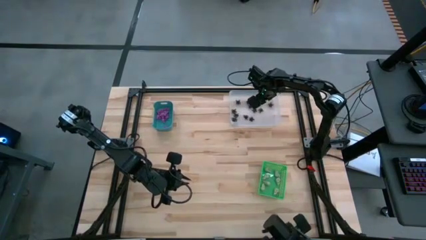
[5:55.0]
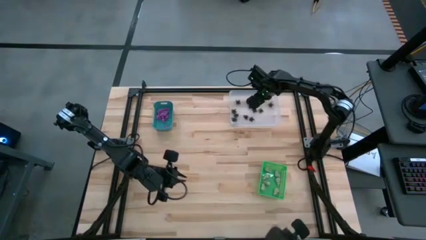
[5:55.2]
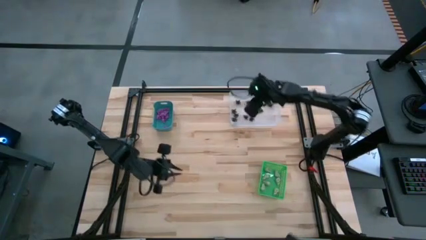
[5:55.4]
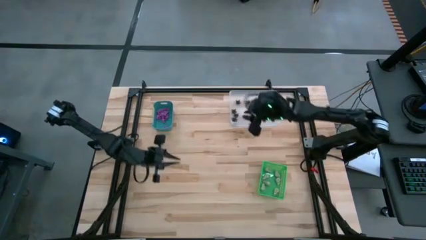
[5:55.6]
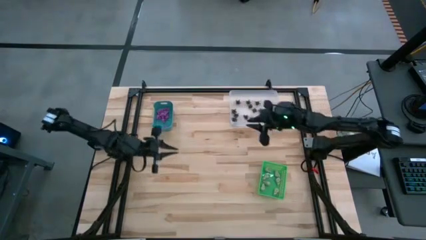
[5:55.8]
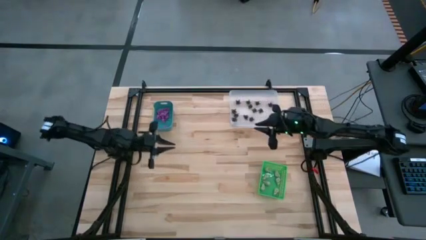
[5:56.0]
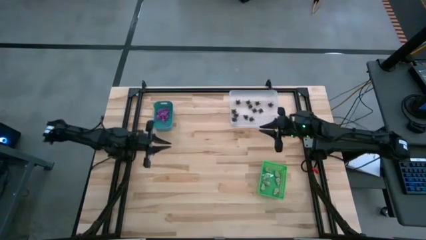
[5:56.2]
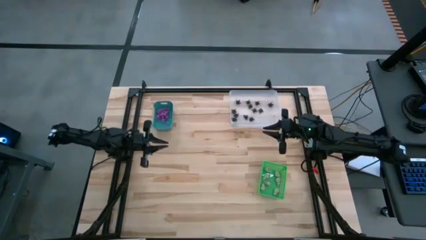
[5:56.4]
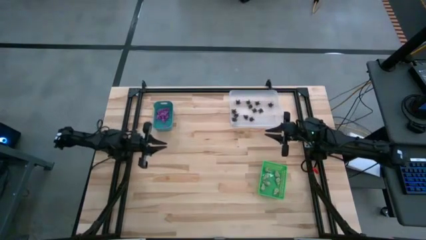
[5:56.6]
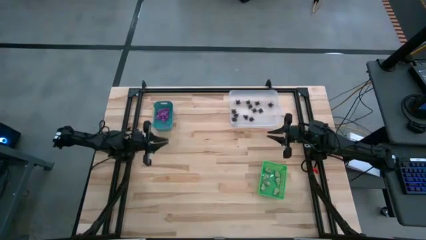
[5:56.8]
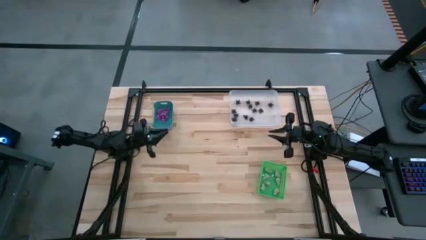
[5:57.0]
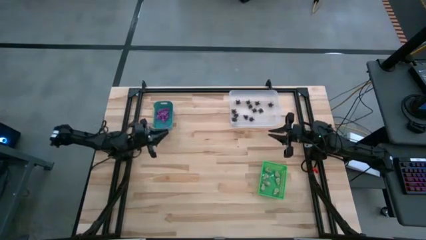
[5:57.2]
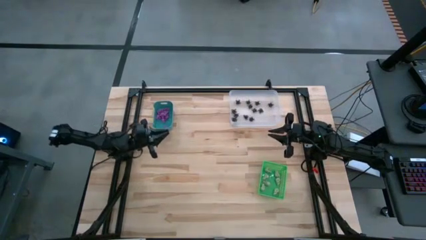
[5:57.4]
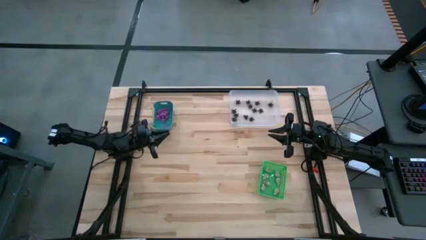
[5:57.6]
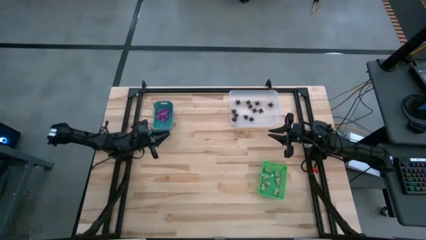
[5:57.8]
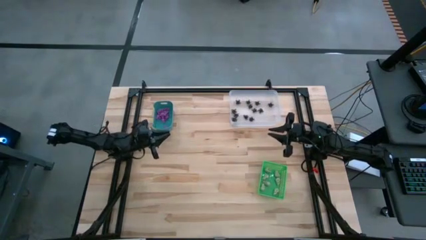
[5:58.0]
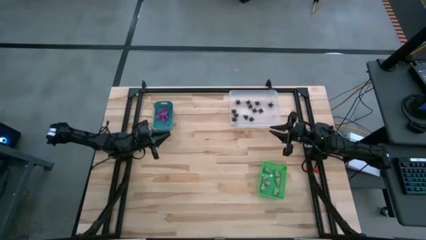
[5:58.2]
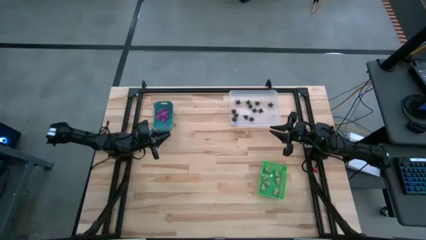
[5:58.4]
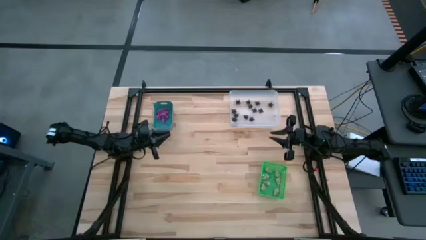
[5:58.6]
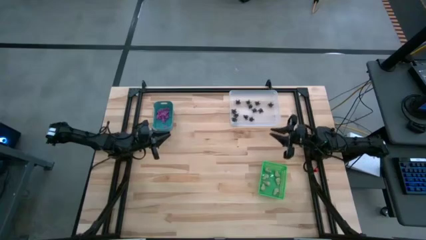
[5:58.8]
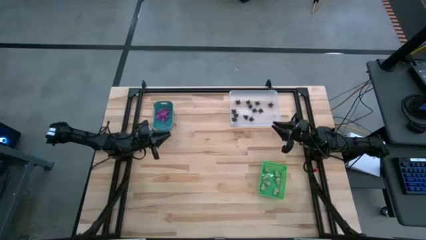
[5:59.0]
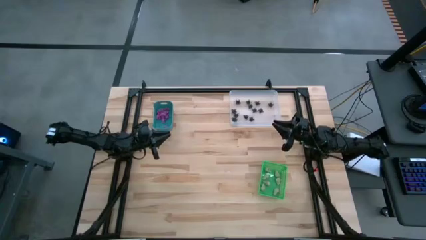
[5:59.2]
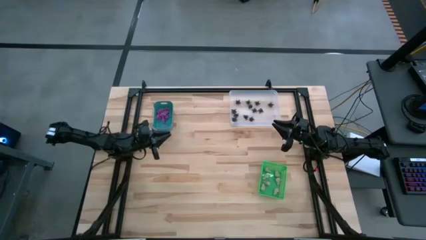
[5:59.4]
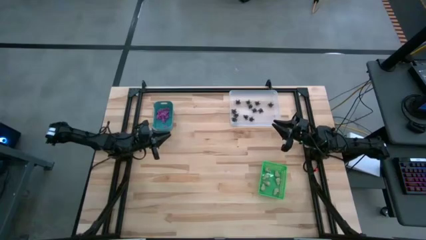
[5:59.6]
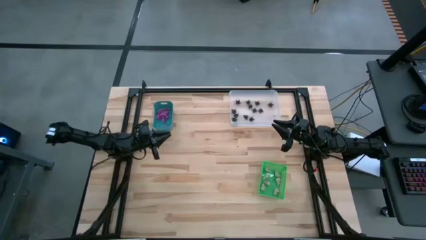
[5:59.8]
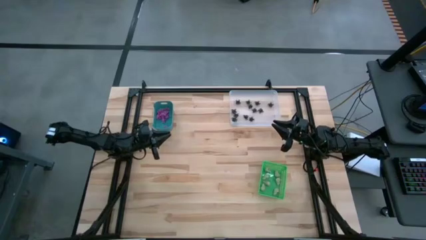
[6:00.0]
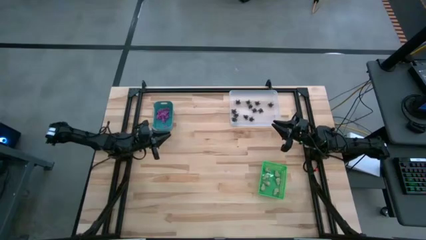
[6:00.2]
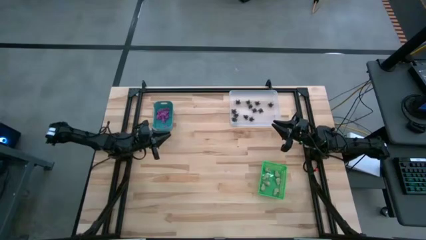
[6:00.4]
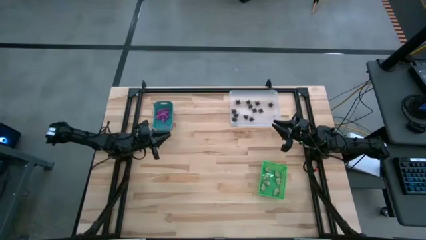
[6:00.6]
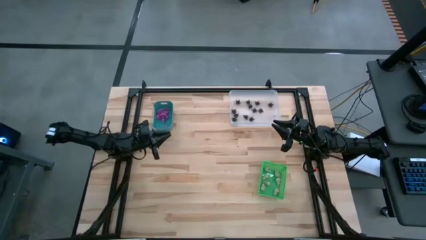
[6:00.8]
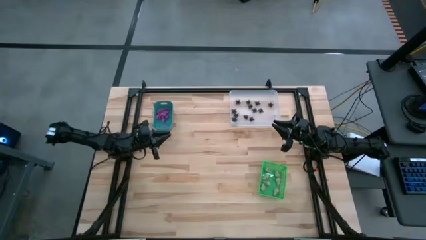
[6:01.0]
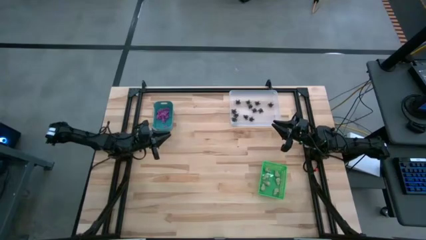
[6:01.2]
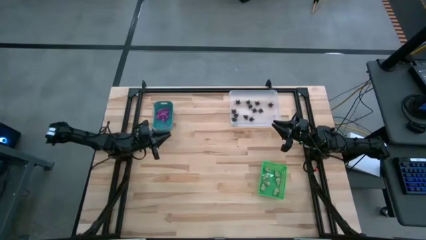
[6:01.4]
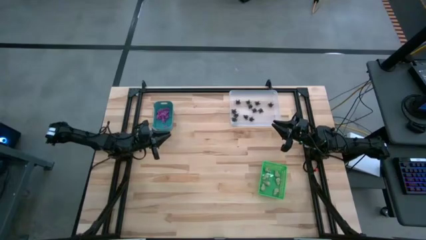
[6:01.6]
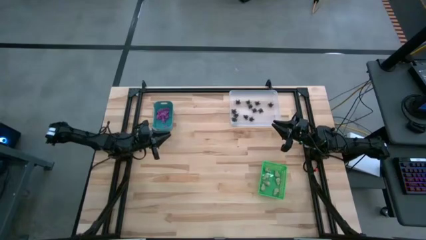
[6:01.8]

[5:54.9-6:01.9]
Task: Sort Halloween decoration
Return to Home Position
